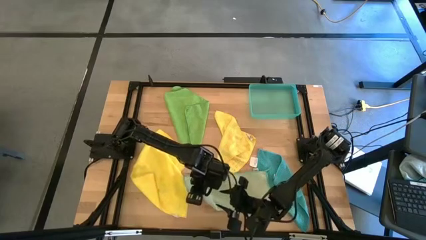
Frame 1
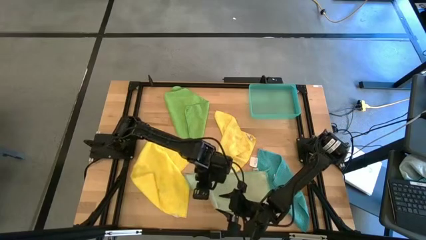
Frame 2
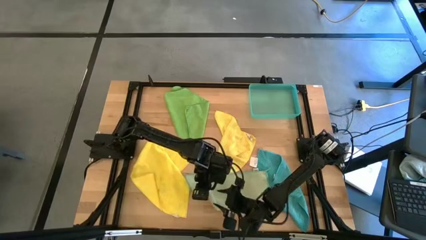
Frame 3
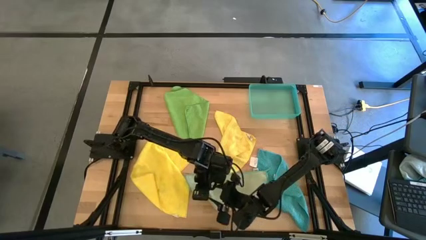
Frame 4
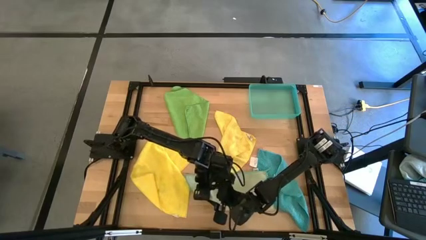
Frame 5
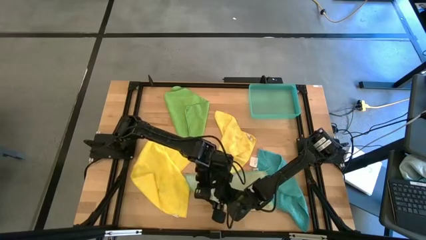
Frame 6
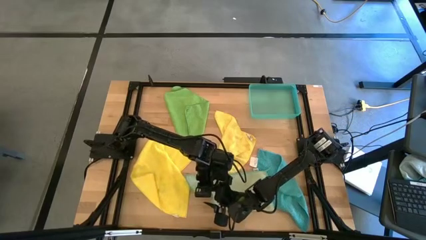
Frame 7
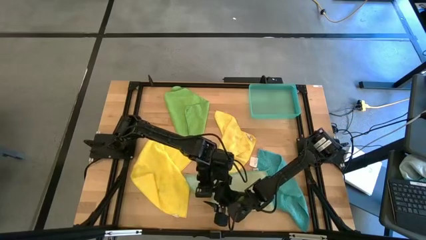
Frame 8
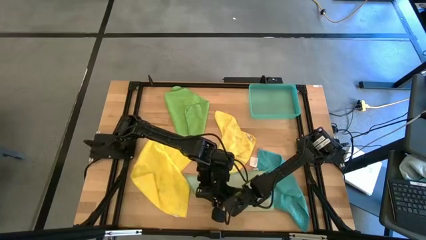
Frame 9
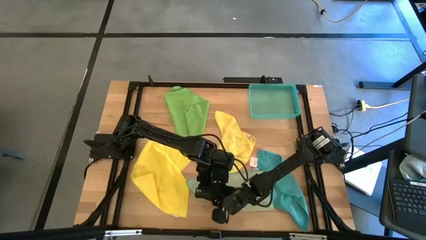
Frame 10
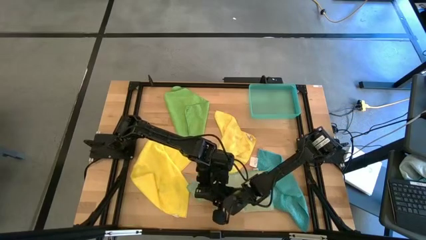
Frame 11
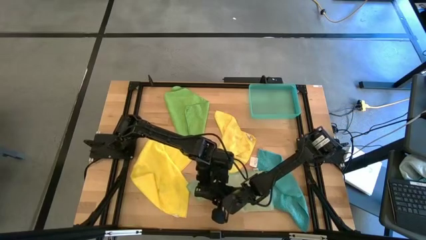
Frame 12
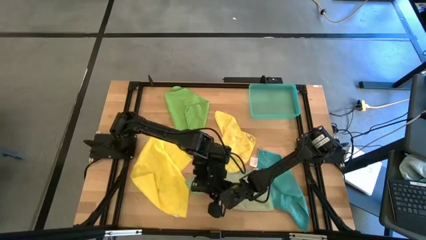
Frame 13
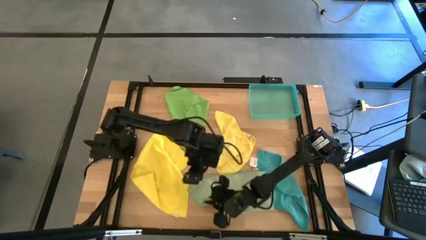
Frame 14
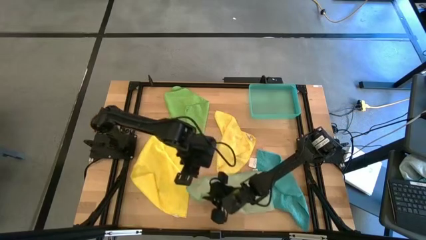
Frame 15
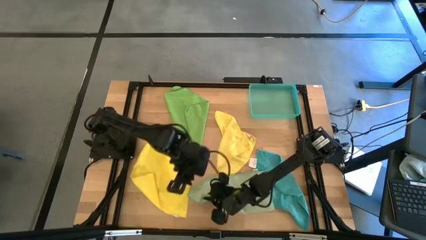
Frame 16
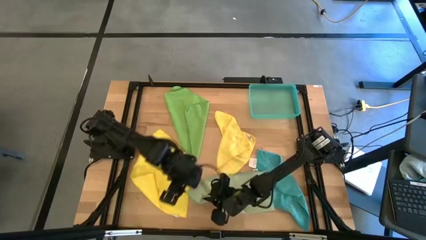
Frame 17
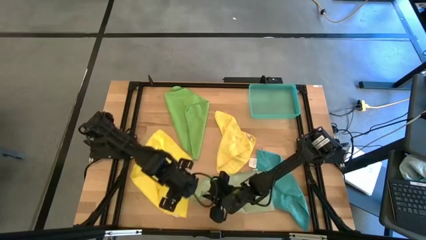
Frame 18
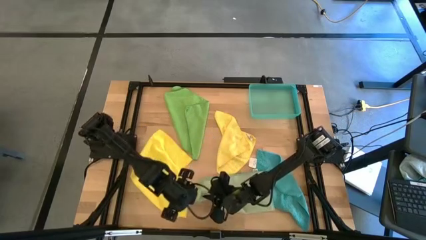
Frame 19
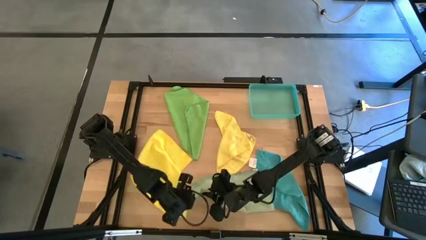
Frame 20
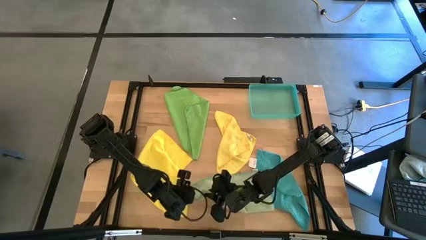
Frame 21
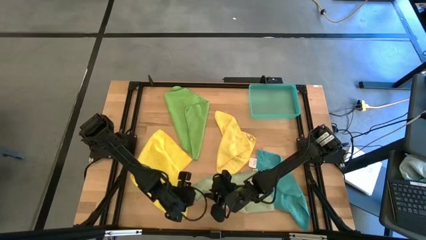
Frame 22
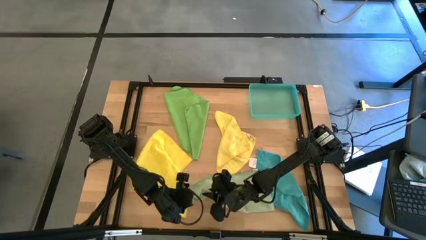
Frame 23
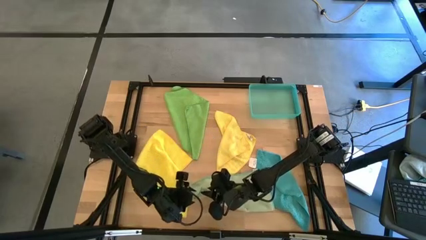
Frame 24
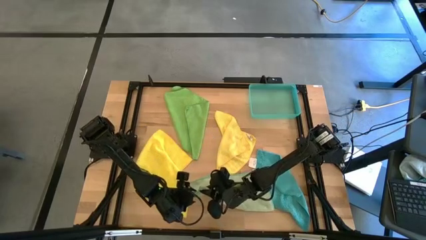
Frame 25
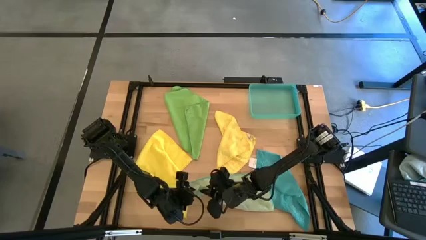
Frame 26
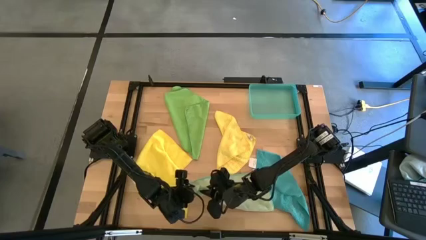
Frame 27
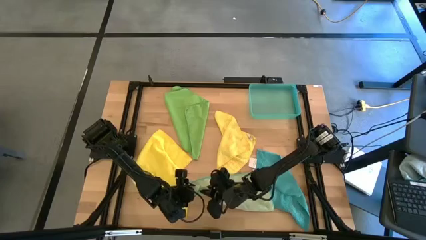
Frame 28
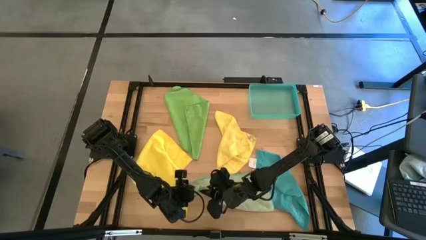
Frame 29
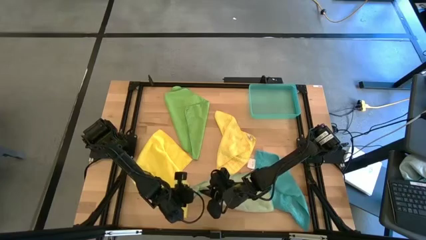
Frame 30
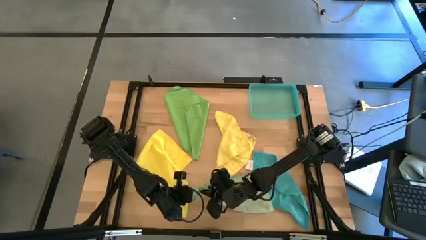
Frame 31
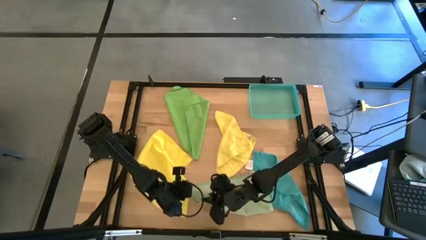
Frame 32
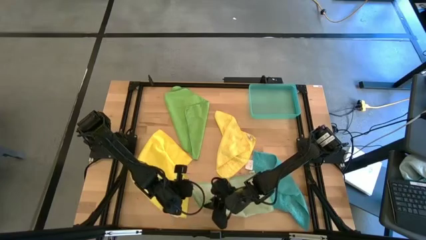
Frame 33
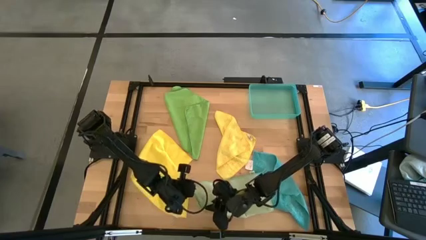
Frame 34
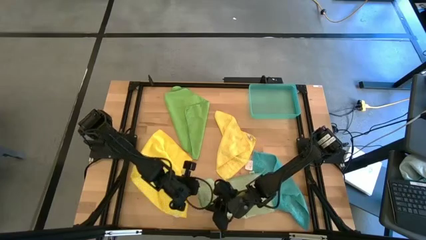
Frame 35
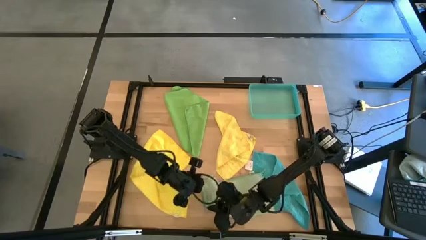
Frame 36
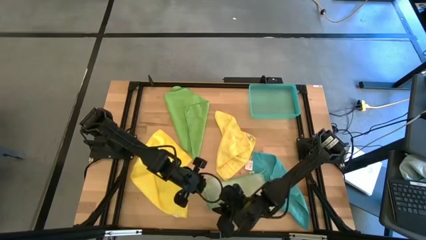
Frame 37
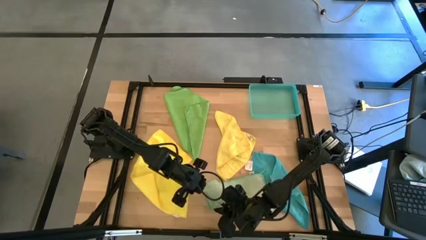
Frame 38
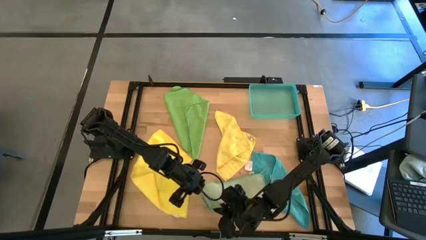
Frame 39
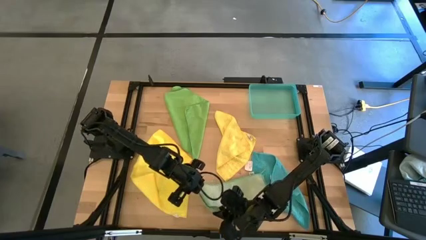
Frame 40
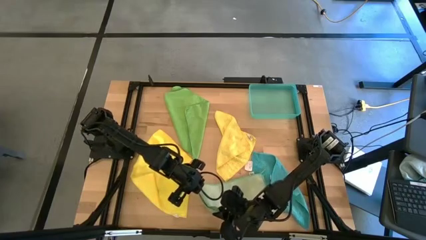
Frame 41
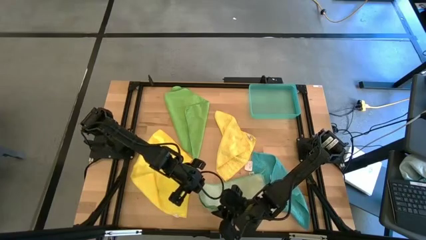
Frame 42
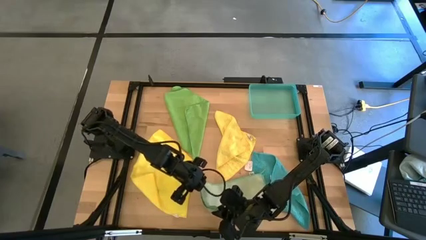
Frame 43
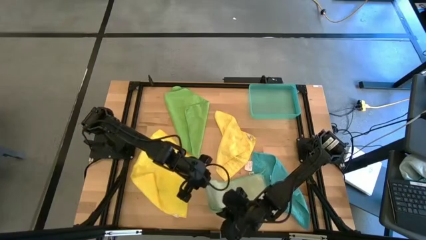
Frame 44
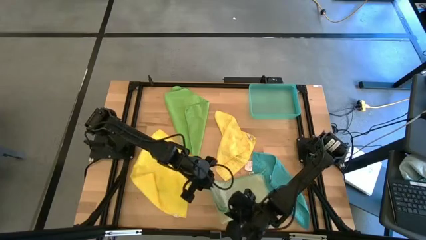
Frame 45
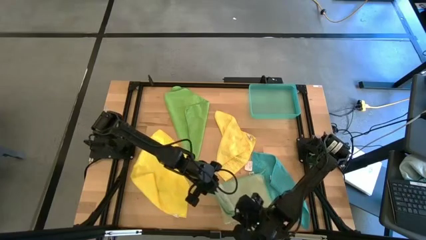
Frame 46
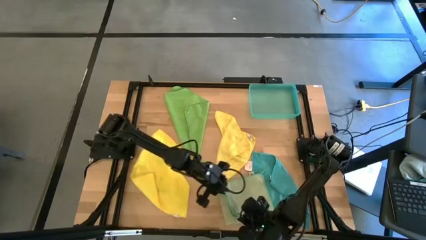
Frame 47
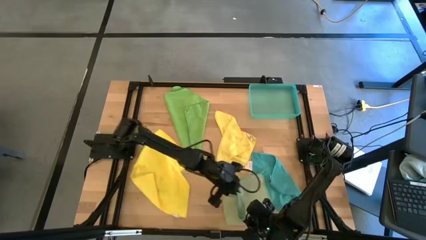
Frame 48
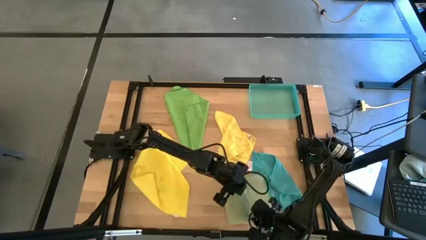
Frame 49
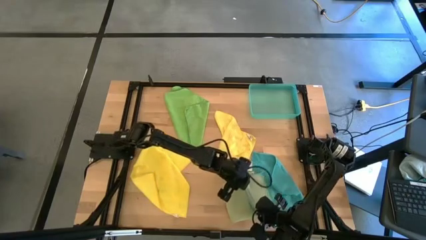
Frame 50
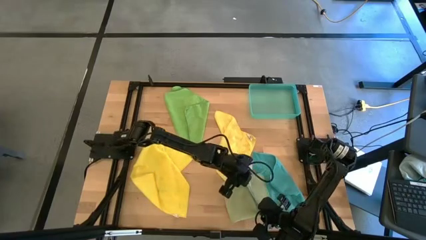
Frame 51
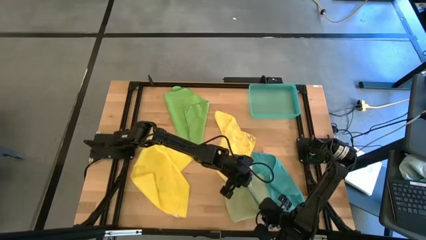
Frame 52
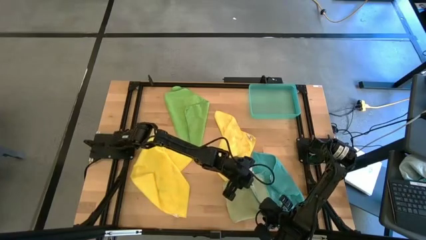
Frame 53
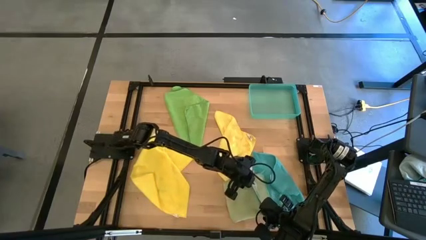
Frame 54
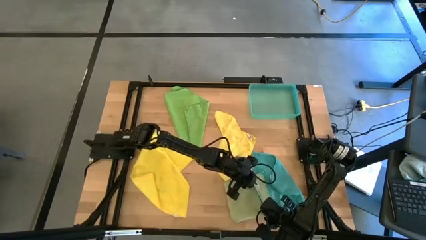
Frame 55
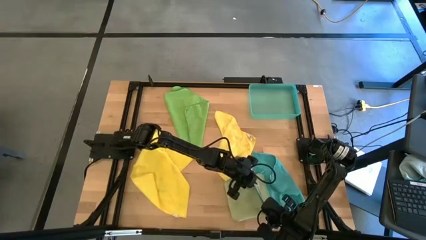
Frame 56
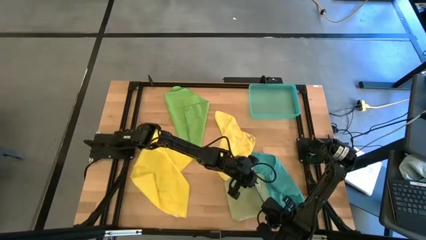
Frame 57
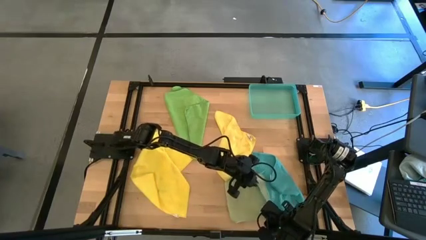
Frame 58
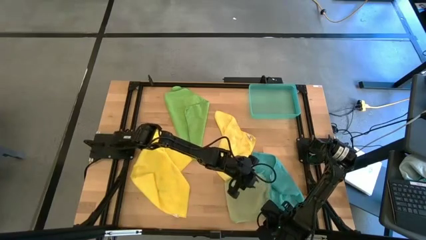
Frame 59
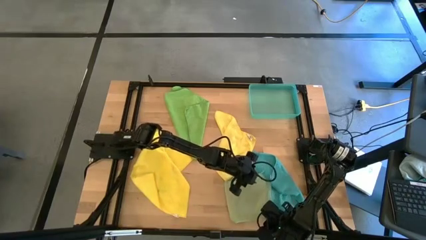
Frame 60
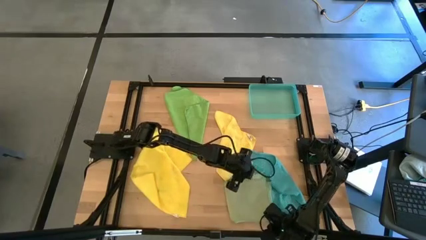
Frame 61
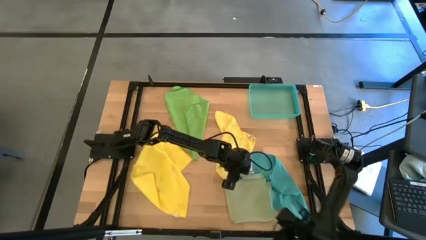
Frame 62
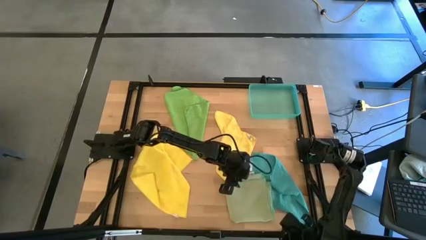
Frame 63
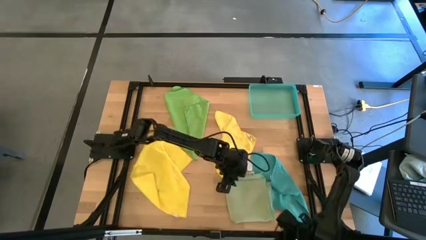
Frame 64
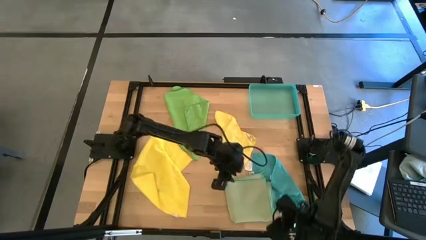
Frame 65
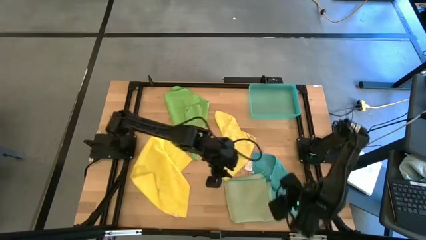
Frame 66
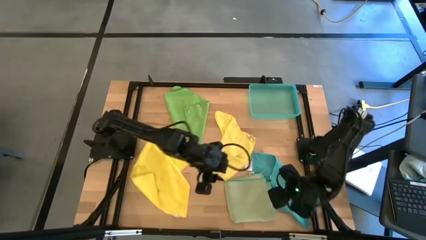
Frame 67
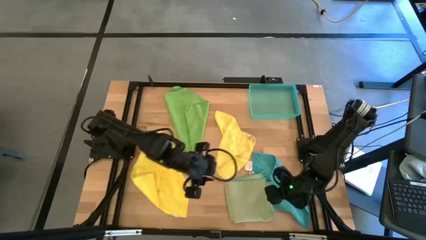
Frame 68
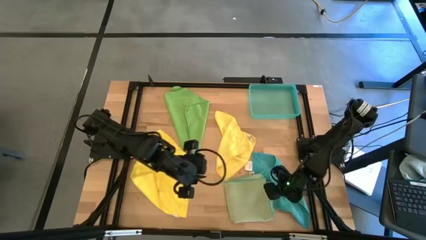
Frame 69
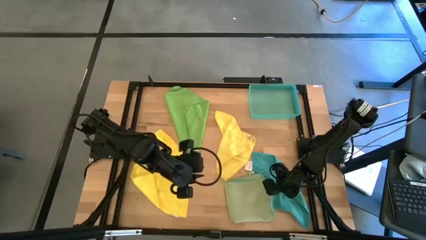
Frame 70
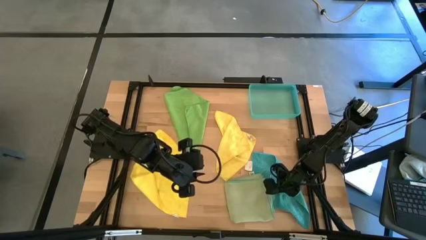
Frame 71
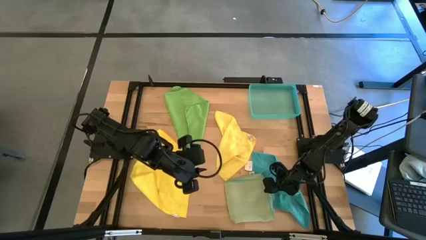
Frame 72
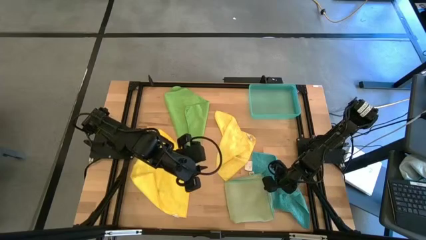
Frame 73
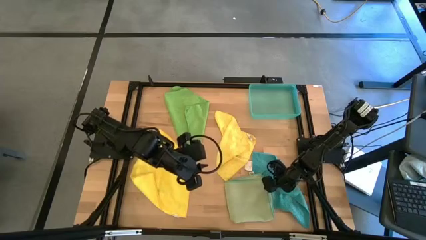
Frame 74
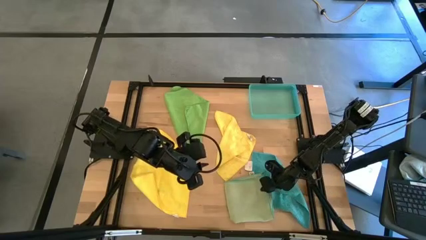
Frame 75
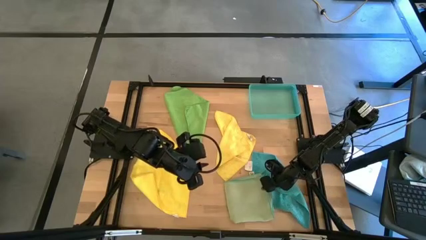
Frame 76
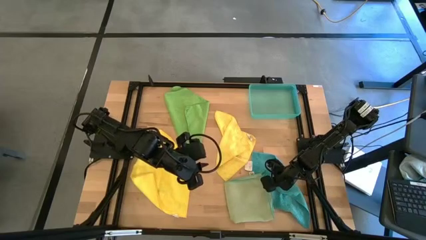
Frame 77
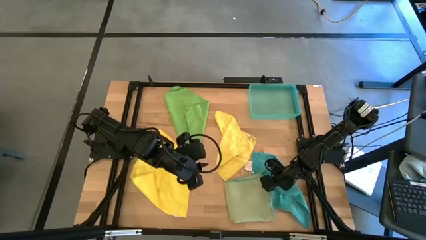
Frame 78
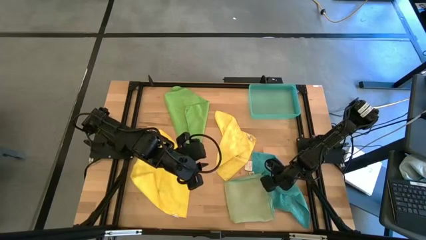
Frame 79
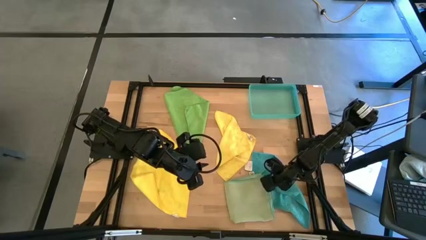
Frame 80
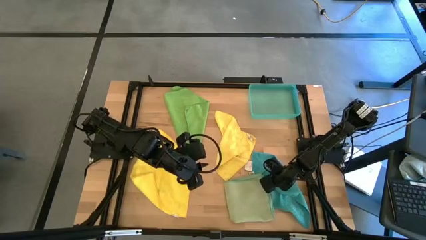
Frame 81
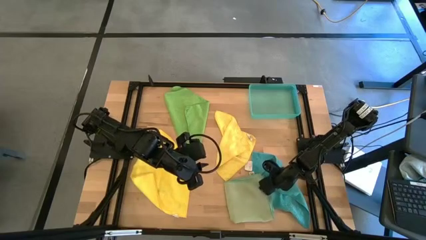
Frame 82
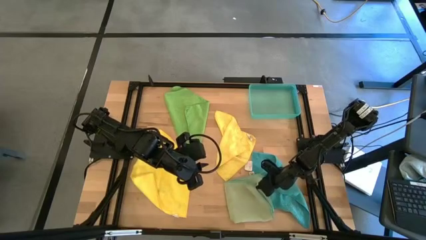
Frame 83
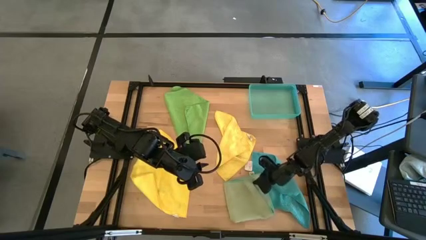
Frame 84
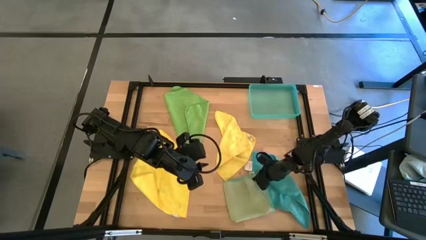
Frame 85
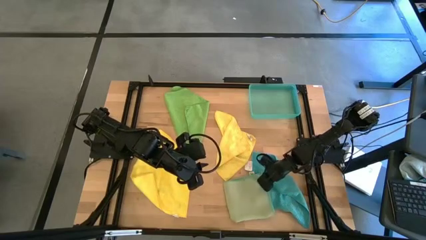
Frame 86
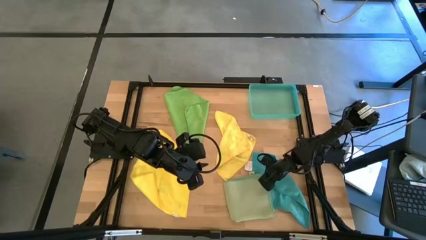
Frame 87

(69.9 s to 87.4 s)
Task: Fold microfiber towels
Fold the light green microfiber cloth
